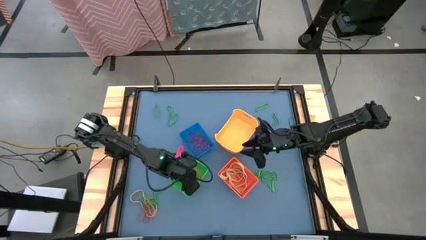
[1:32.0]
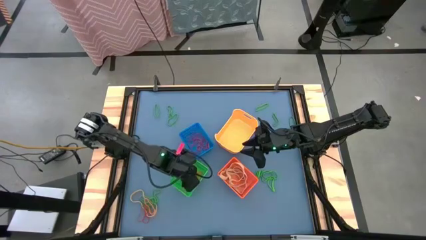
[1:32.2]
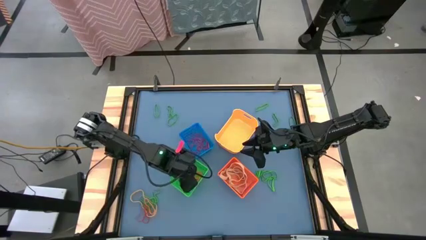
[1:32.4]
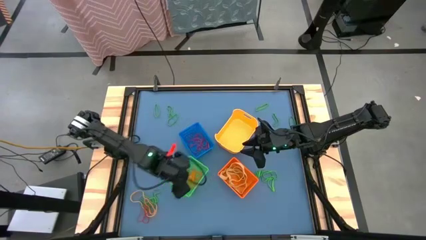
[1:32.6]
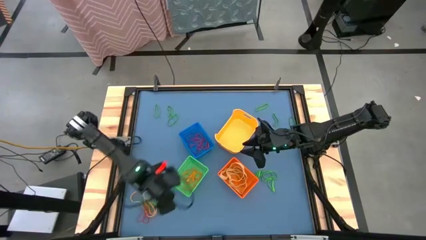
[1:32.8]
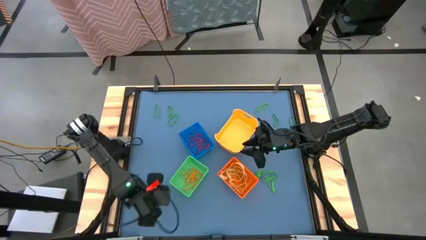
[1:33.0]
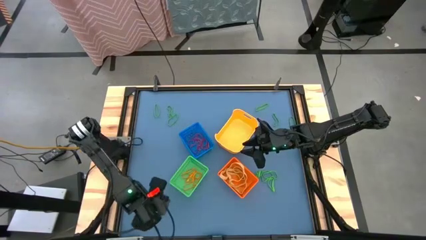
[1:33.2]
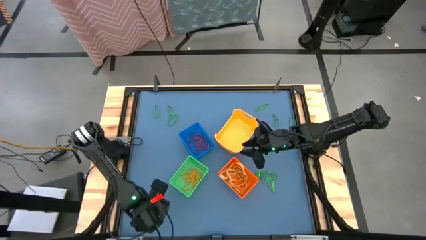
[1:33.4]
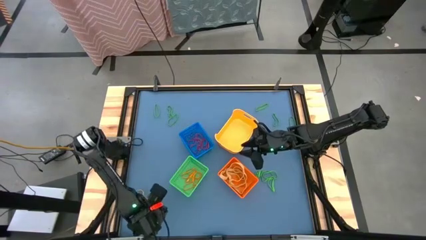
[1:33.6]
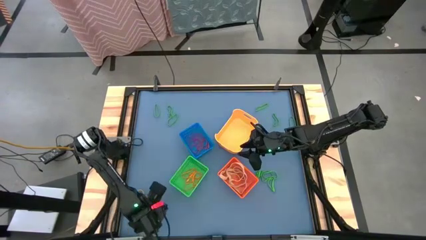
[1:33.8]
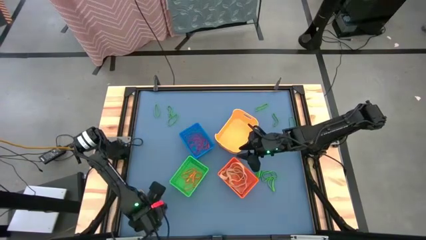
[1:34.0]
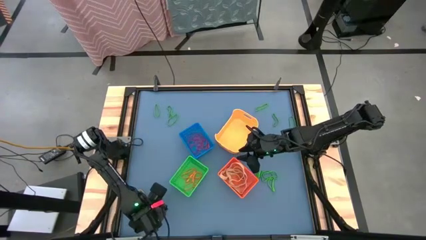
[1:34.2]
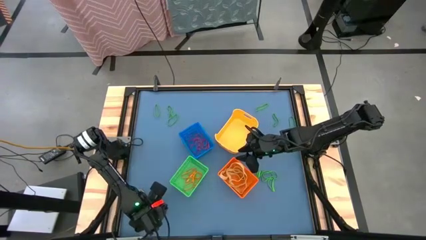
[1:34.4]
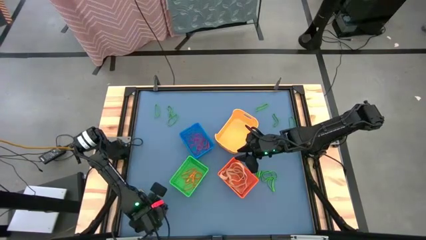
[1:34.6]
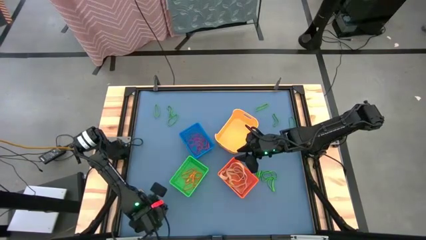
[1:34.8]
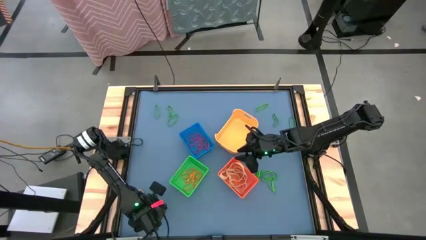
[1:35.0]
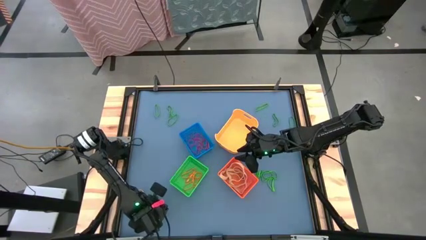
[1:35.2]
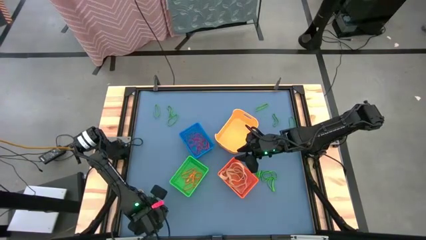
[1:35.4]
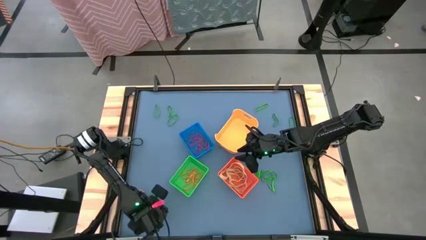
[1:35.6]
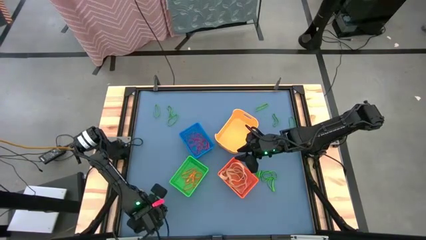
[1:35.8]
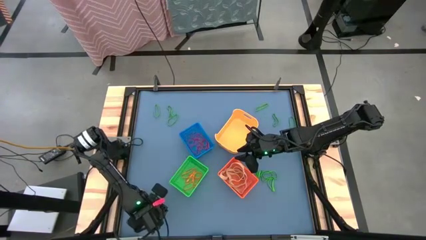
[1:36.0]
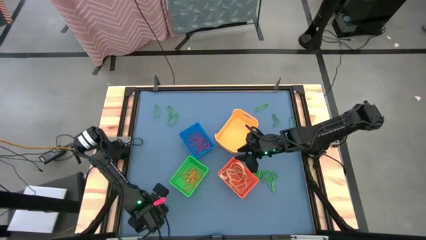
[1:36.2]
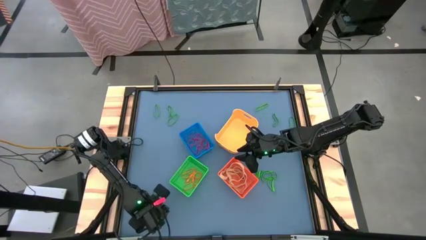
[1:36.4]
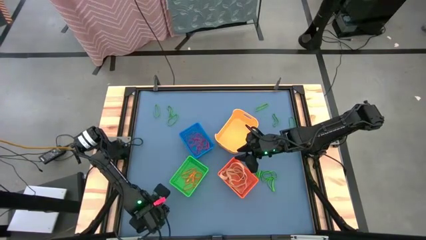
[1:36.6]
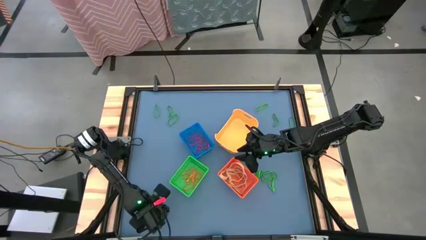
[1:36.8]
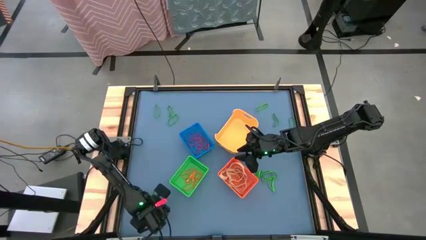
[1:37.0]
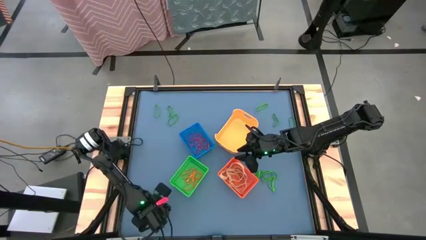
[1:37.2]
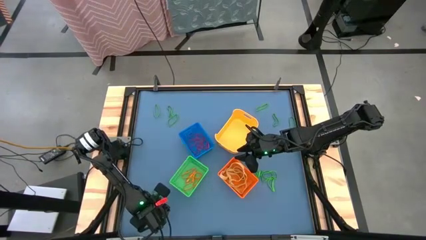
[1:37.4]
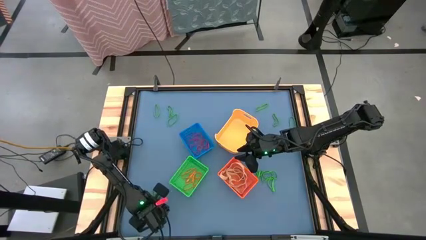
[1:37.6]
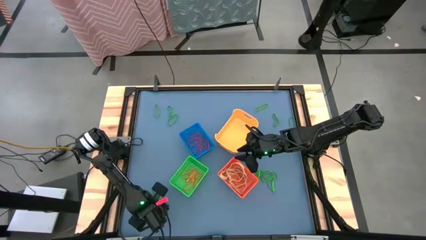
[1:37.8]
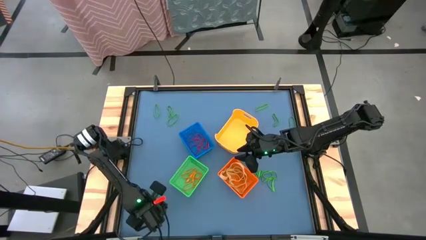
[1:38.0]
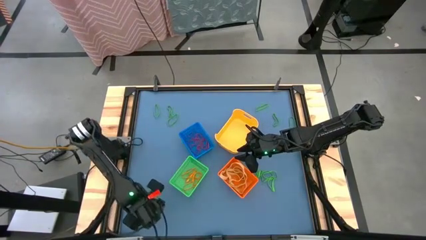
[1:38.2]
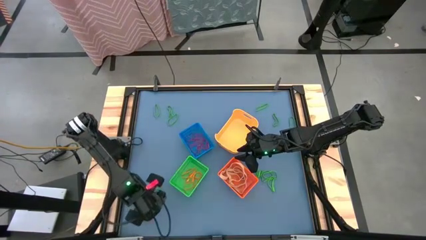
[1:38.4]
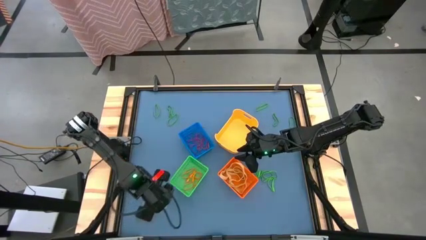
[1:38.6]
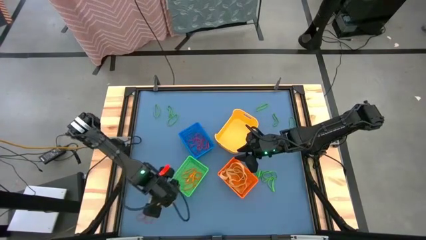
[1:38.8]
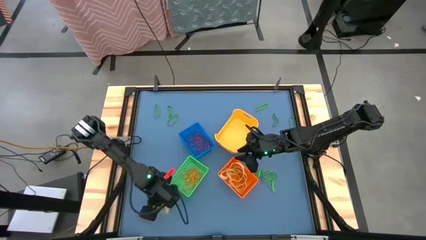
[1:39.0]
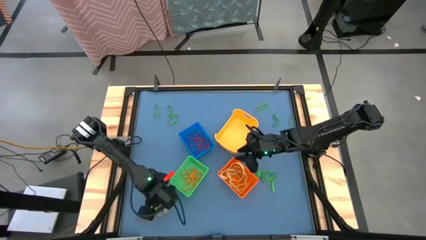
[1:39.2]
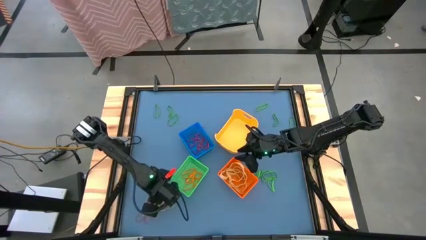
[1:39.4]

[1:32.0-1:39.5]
Task: Sort rubber bands into baskets
Put the orange rubber band into the green bin

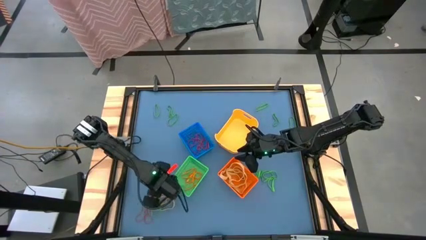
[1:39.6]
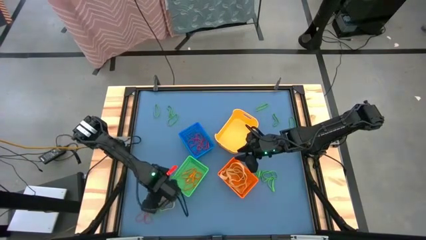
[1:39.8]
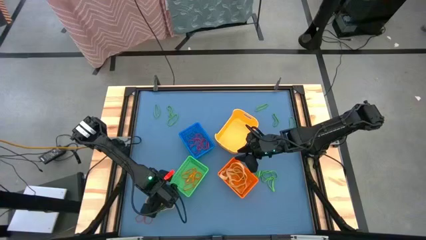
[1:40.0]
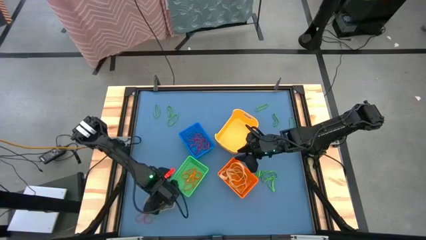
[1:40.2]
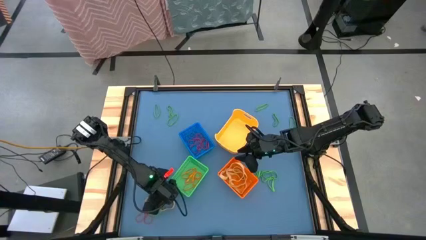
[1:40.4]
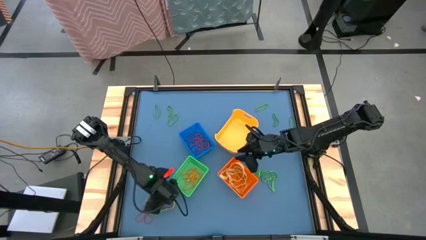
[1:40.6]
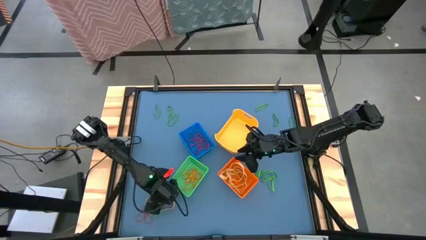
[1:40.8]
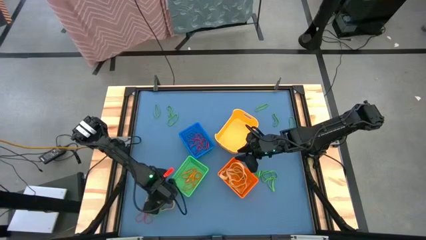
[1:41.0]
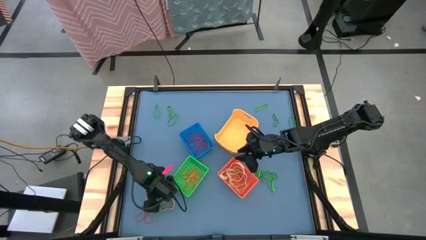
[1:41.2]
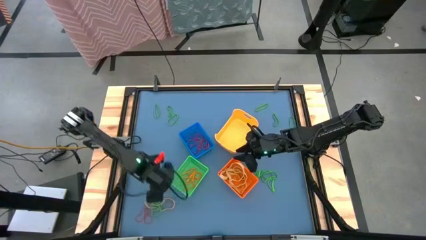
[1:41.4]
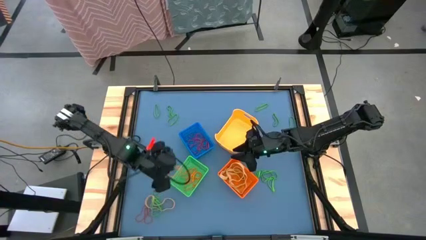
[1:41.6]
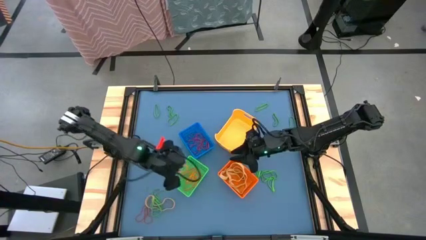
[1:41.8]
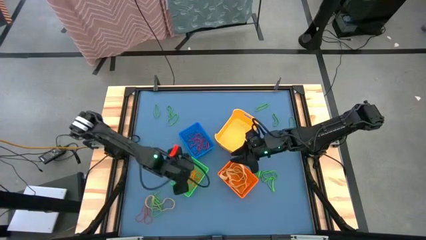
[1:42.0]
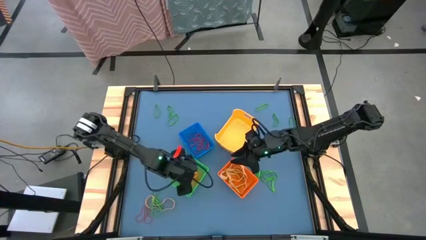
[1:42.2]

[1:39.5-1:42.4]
Put the orange rubber band into the green bin

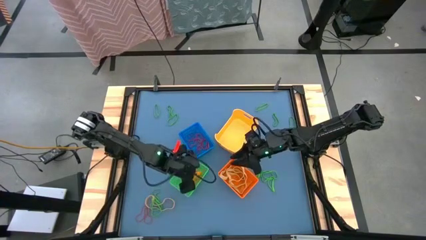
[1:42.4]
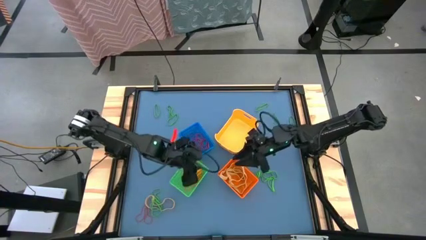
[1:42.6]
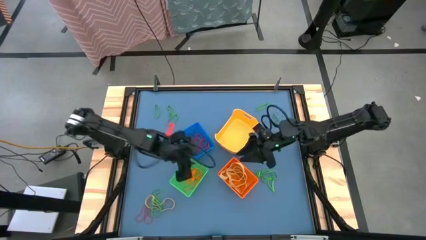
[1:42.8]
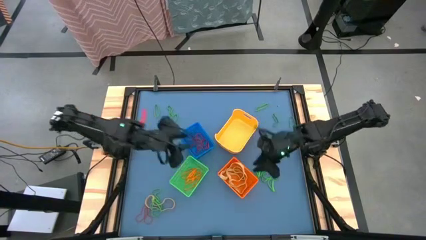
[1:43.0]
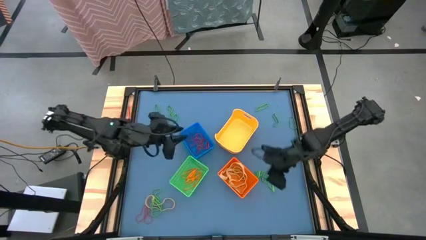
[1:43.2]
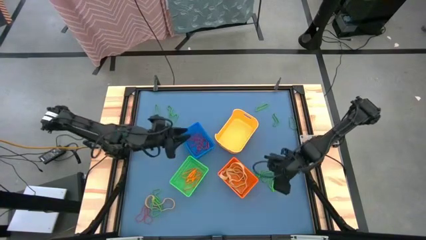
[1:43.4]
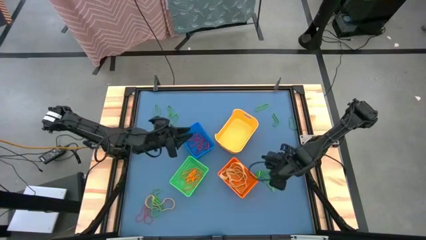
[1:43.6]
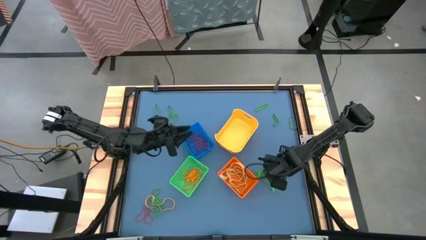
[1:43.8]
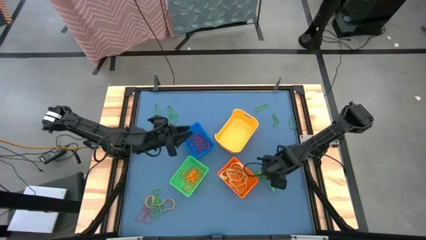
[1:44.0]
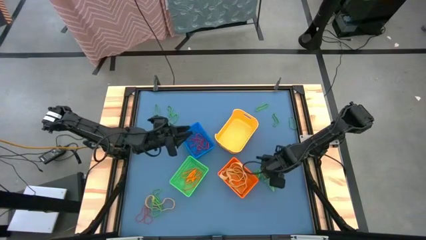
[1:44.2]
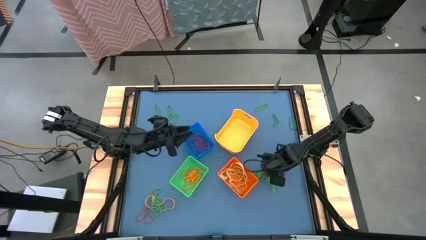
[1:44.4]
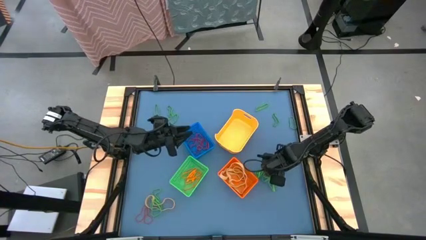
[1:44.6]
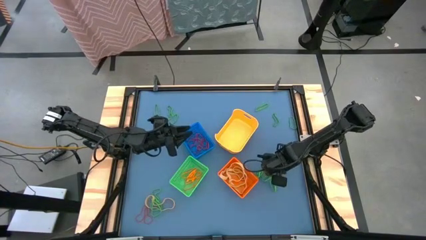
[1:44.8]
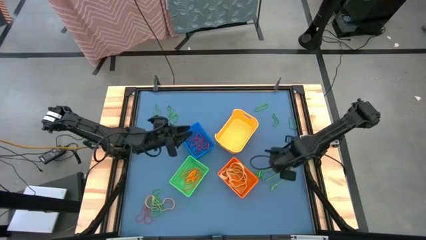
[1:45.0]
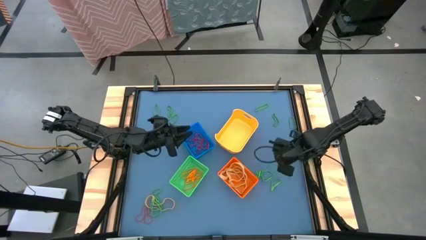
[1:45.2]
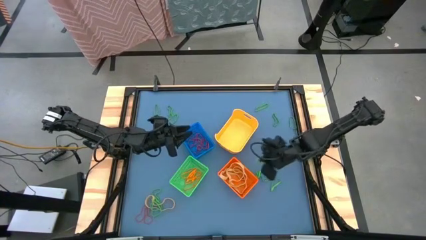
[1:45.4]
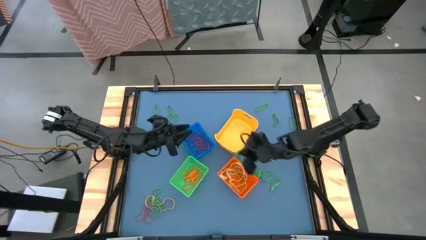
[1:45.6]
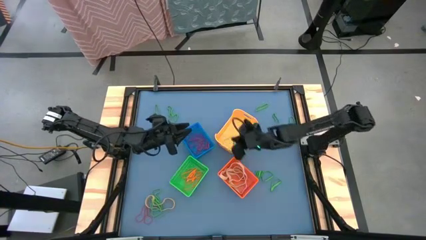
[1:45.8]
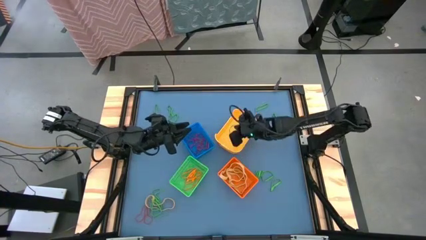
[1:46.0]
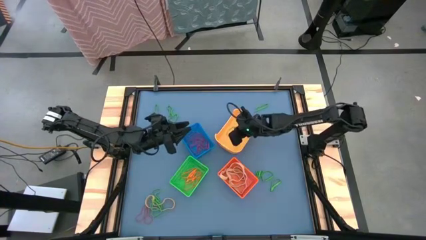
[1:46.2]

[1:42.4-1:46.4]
Put the green rubber band into the yellow bin

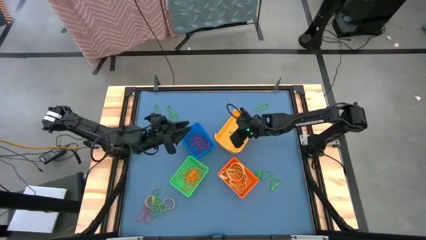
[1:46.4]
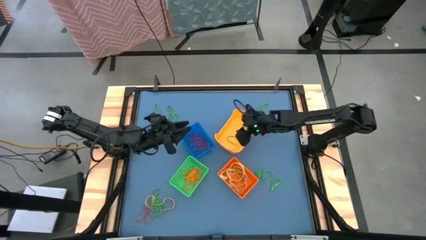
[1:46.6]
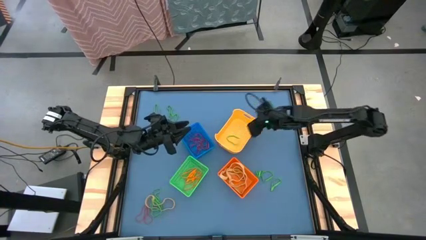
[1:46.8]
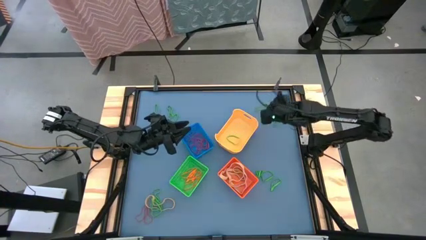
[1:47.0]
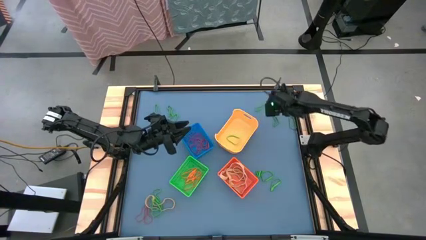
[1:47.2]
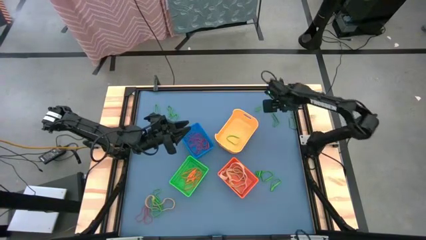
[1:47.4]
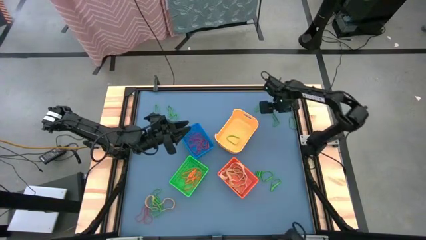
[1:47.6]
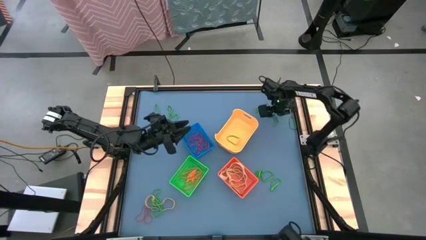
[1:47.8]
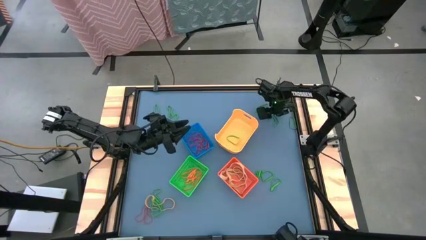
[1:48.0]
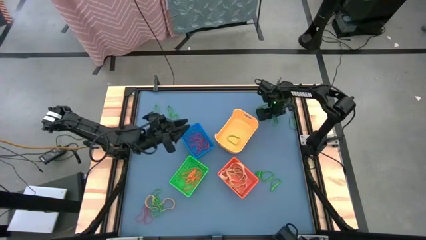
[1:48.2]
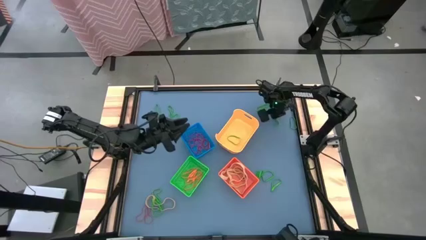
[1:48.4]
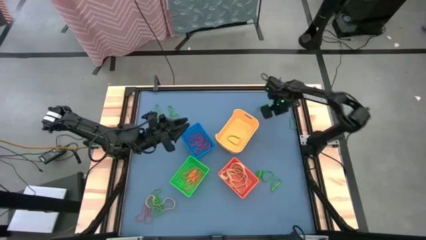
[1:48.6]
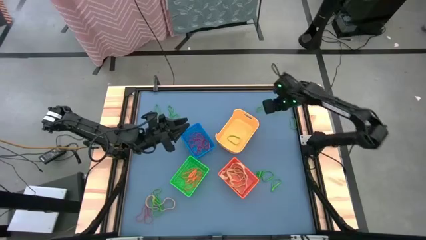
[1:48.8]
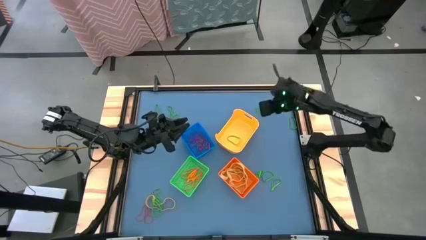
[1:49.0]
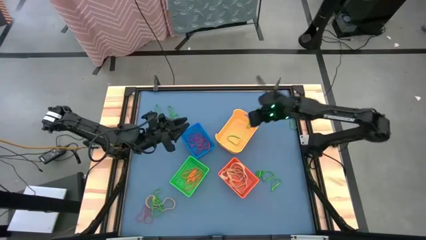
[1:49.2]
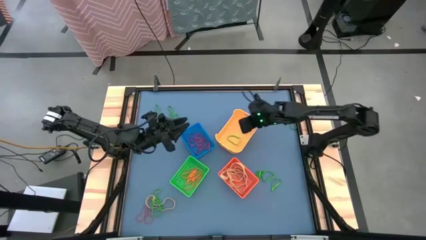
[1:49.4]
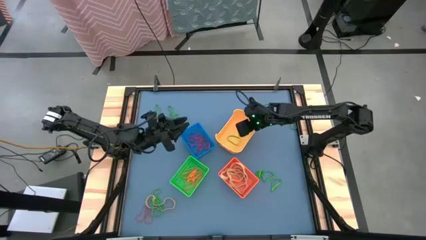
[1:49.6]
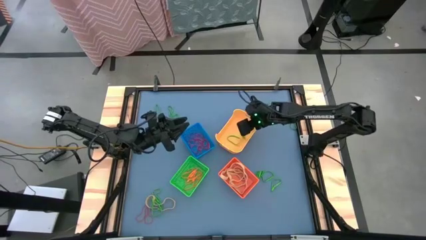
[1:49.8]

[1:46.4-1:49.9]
Put the green rubber band into the yellow bin
